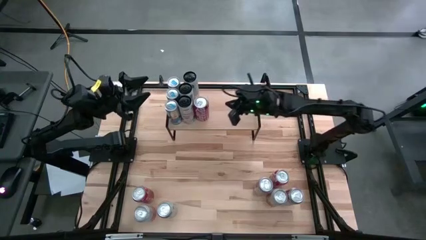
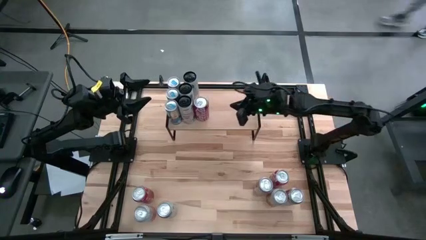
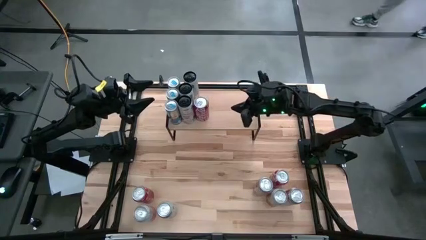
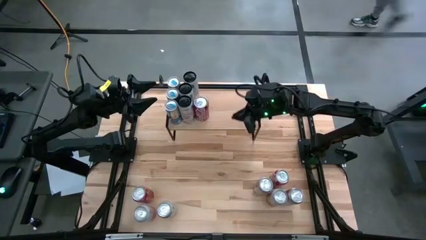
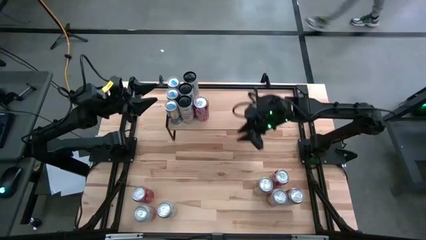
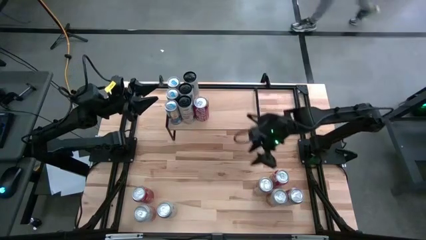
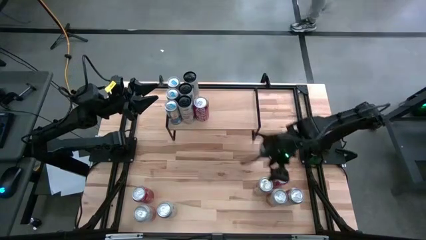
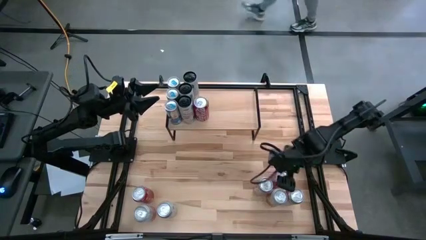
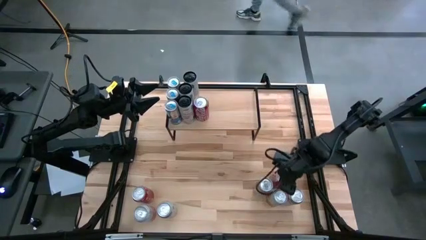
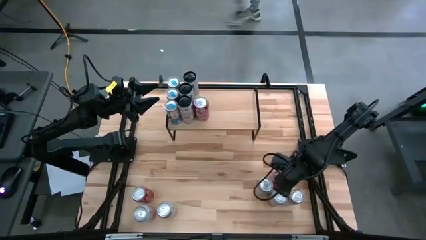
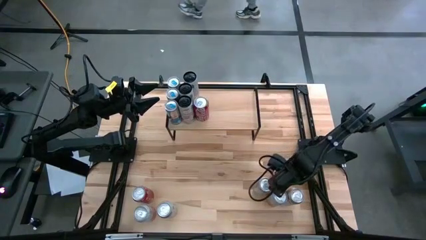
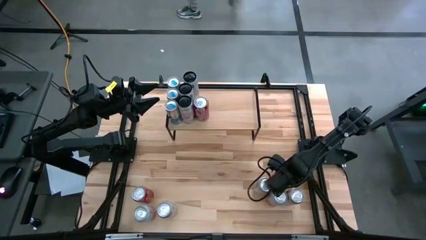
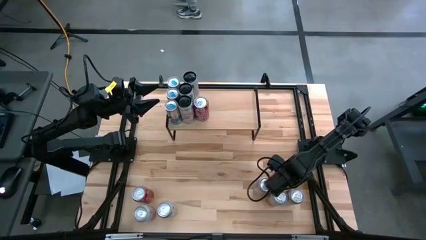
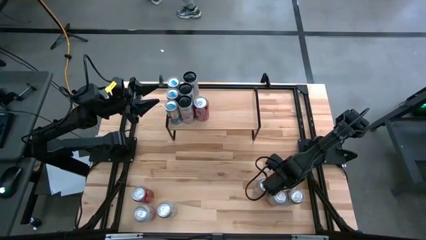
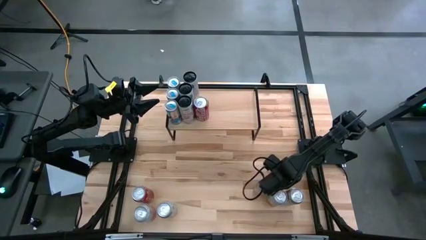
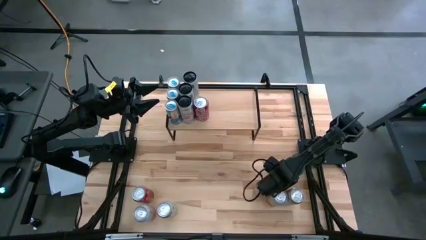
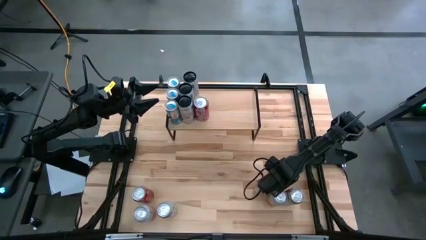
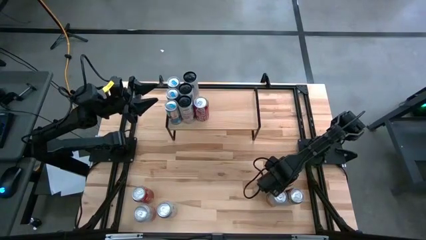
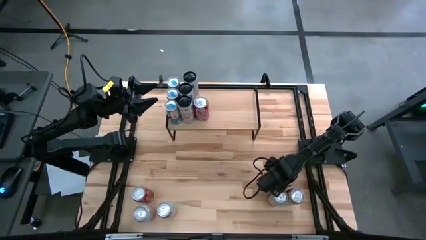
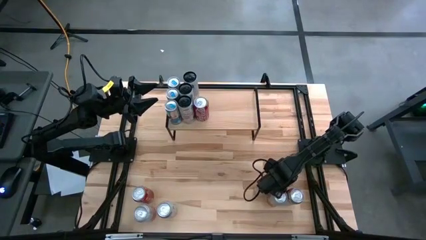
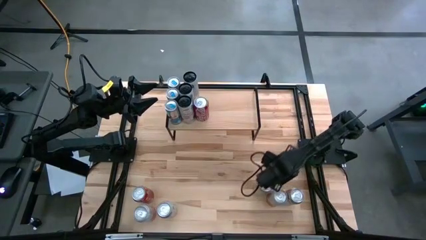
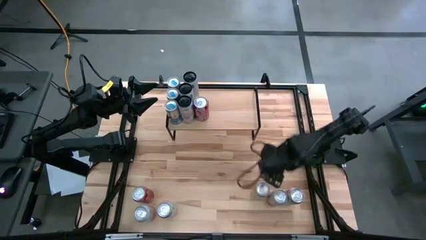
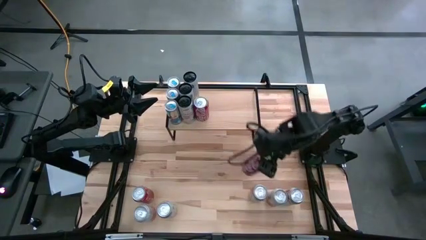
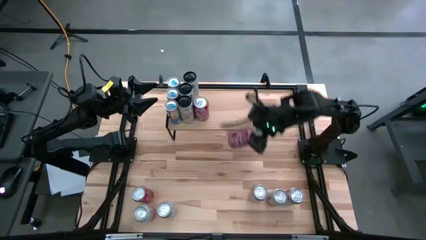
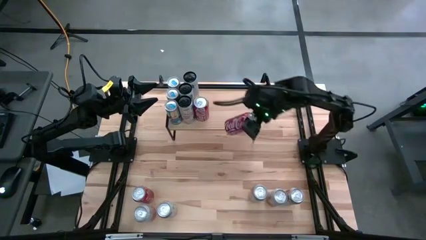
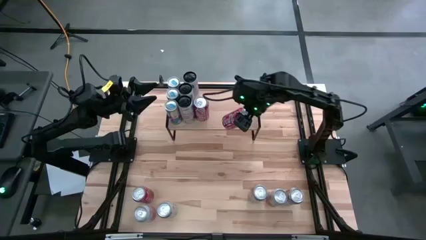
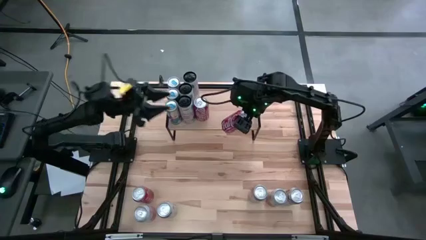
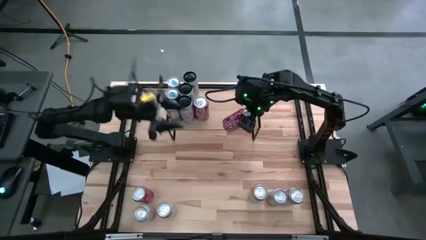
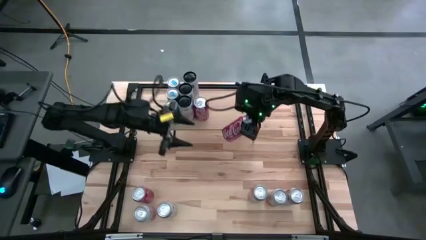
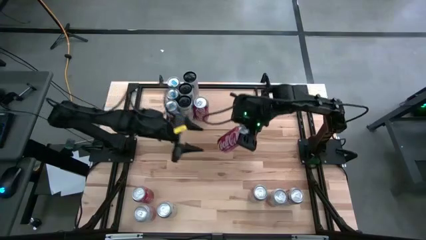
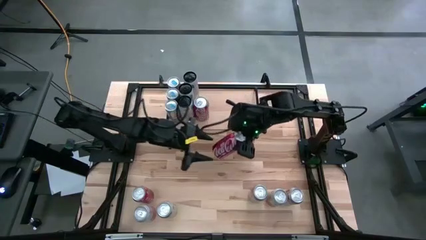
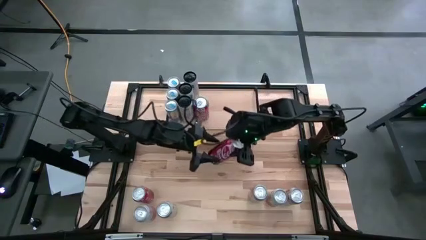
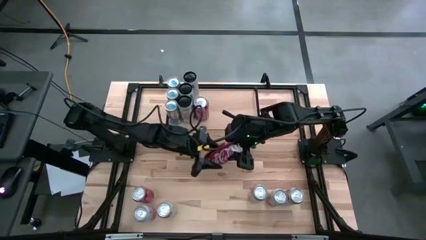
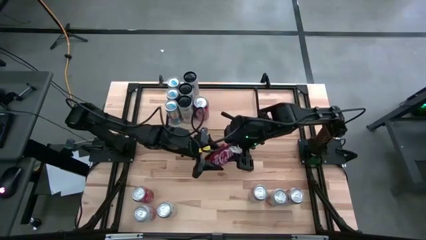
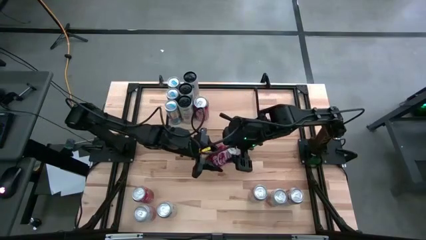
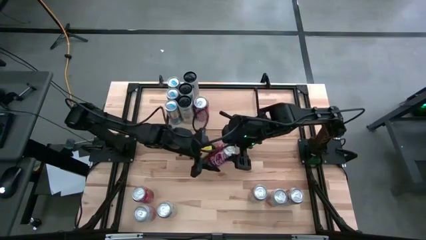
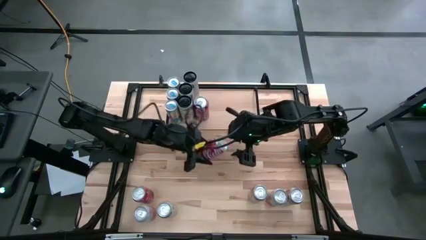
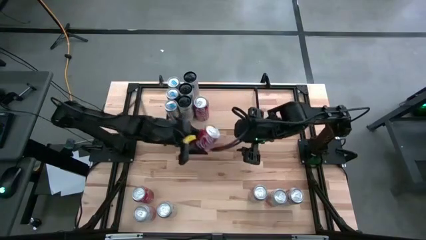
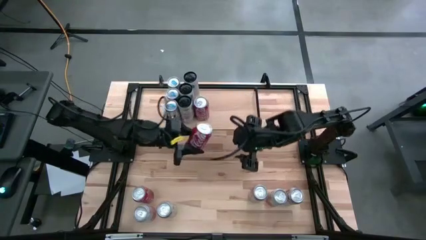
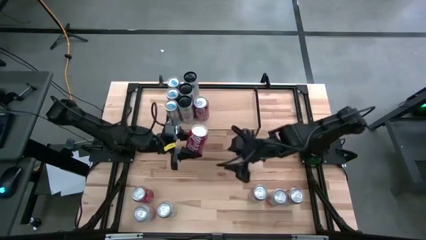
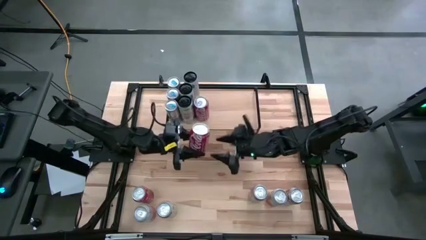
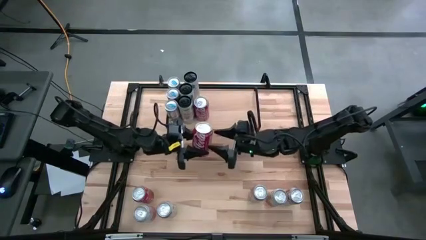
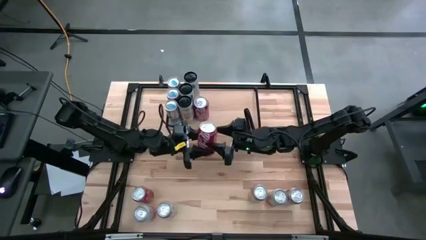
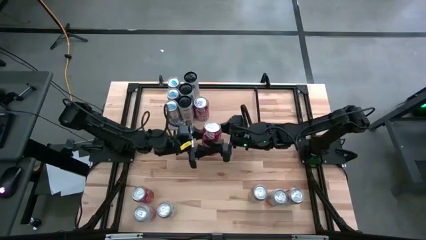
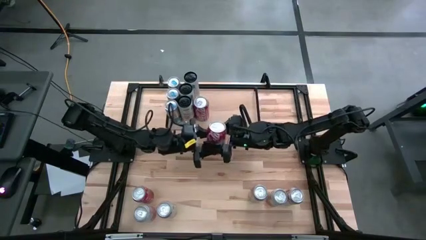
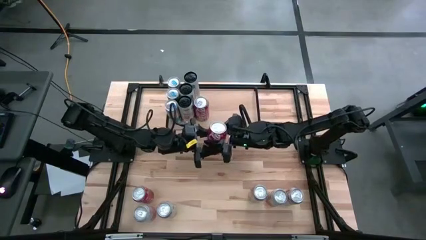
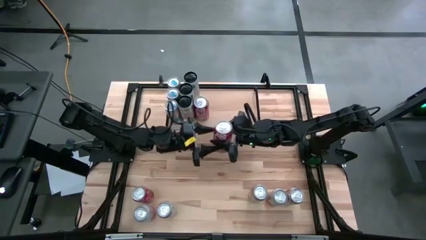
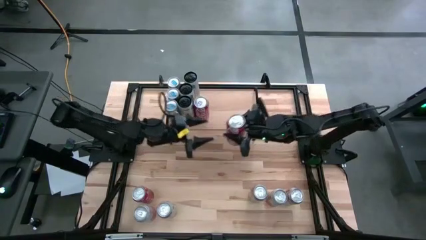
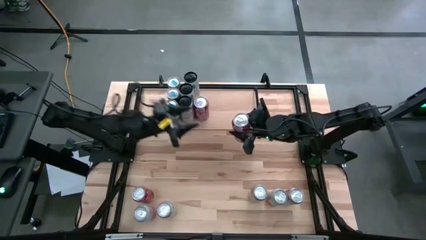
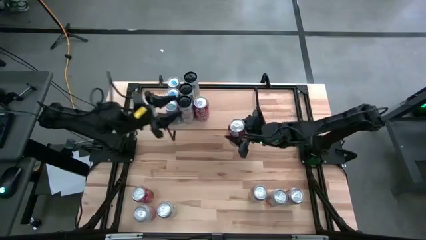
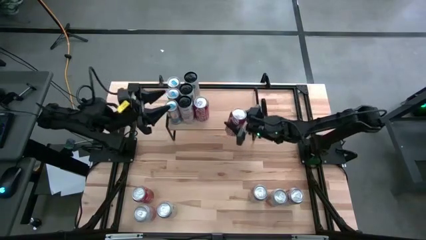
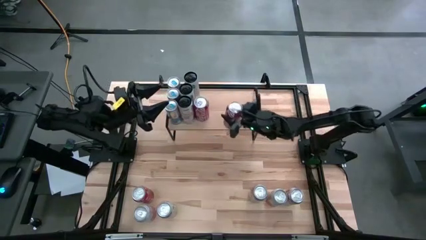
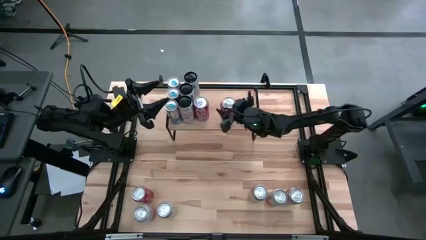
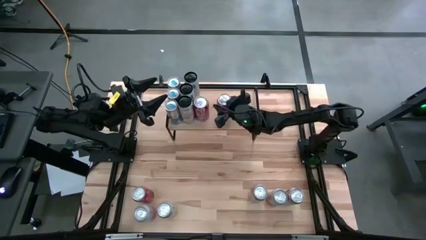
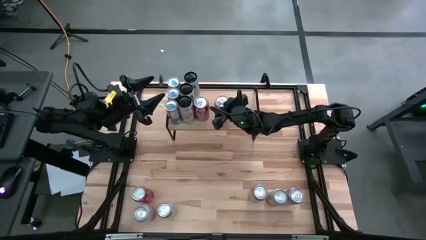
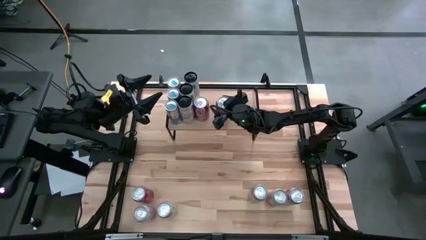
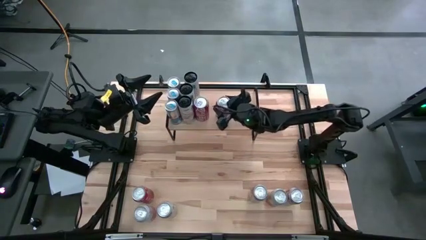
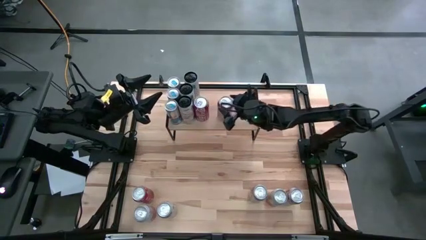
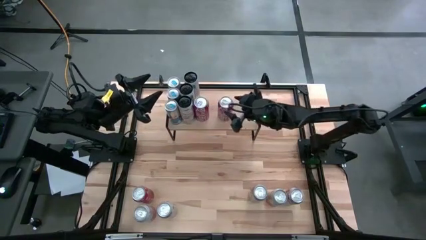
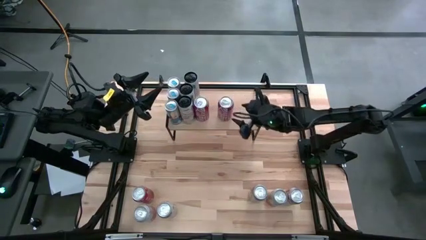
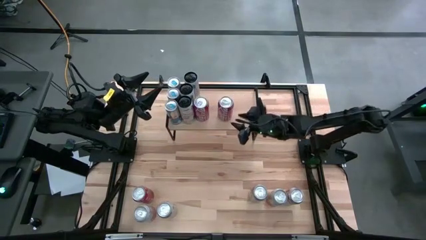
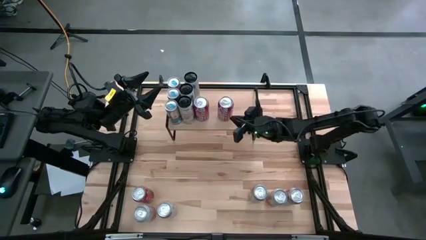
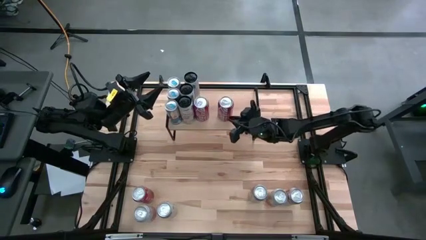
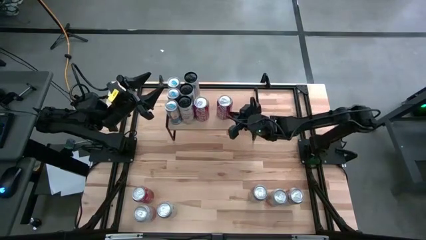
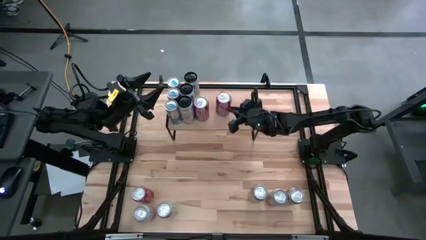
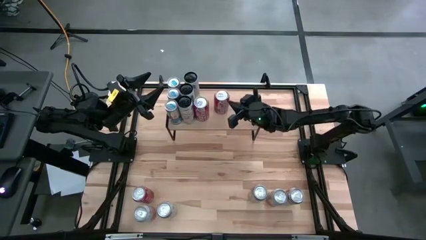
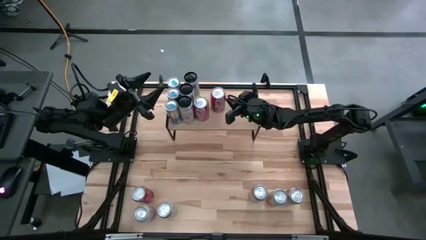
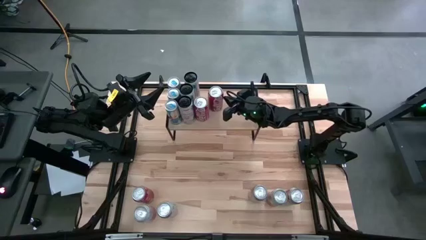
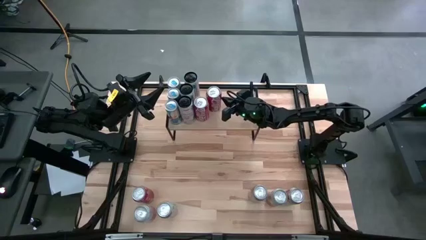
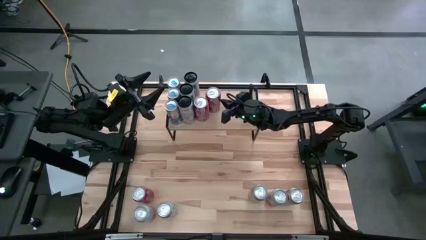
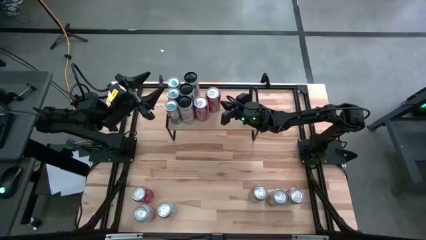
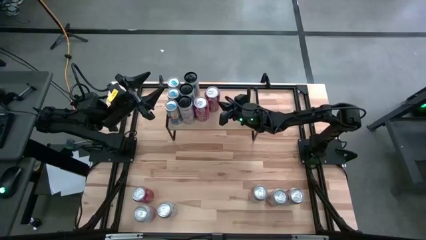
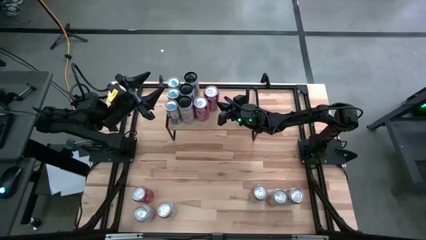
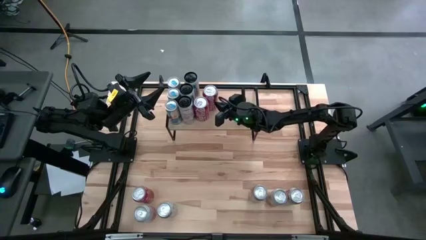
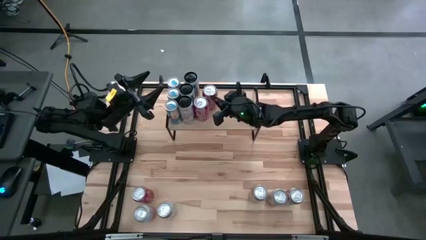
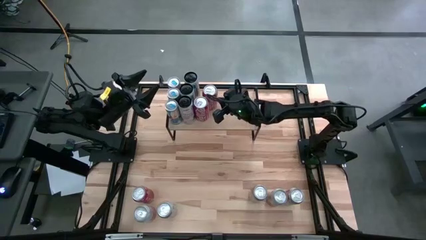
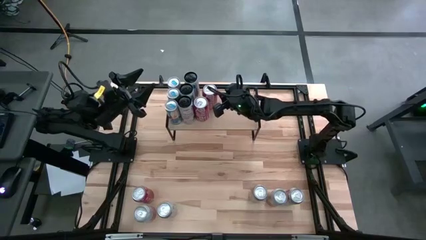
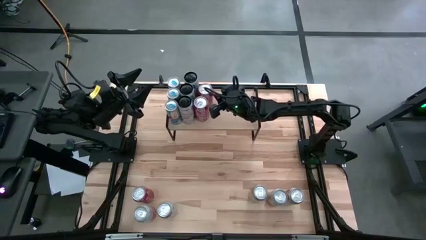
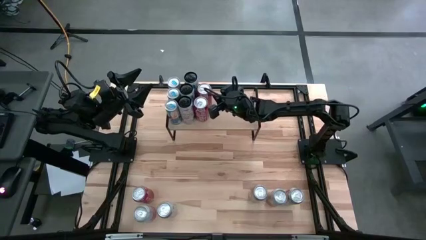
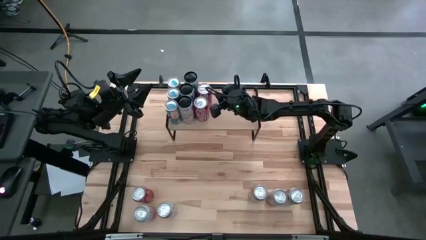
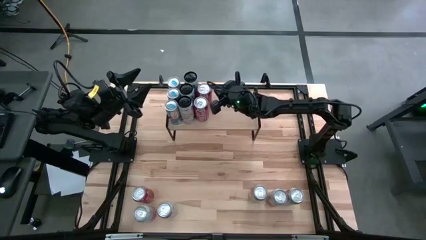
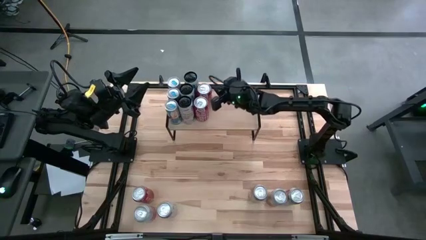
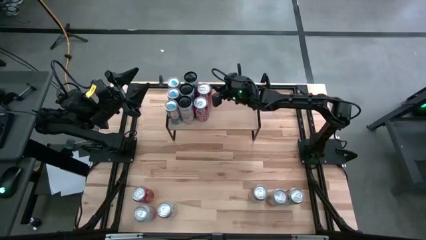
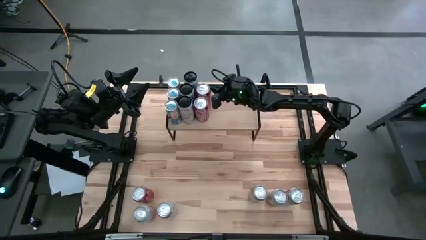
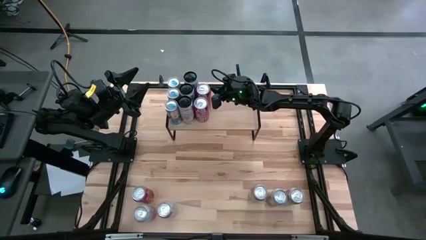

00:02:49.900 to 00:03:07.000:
Task: Place canned beverage on shelf
Put the right red-white soda can aligned with the other red-white soda can on the shelf
